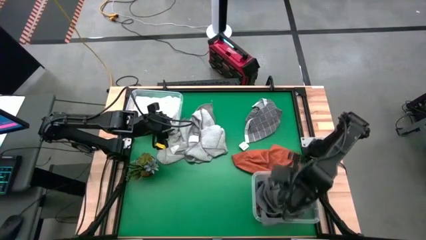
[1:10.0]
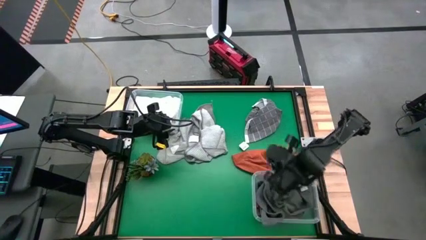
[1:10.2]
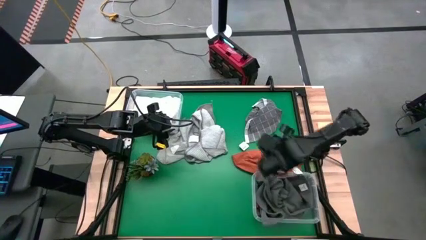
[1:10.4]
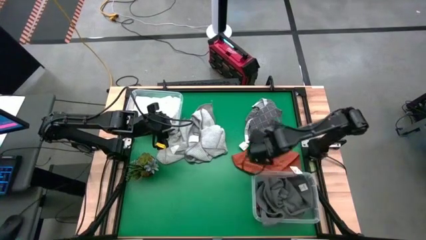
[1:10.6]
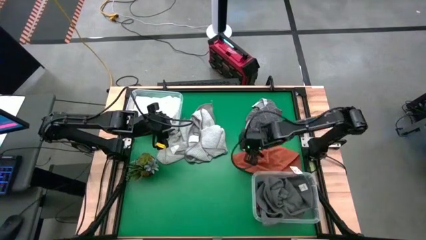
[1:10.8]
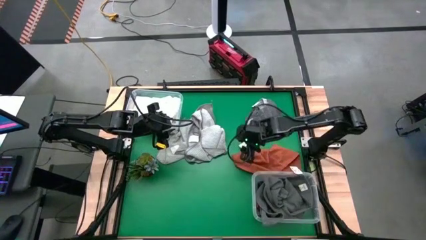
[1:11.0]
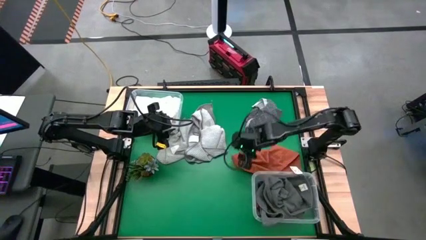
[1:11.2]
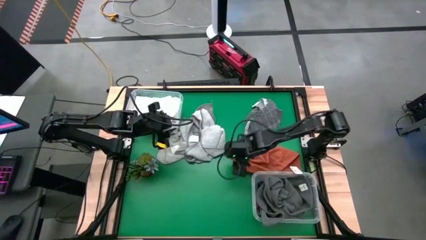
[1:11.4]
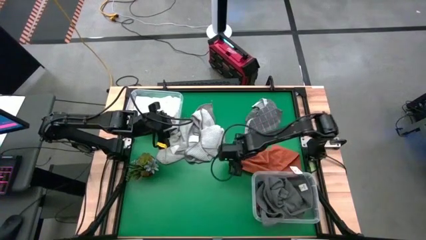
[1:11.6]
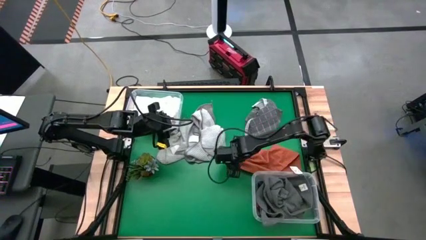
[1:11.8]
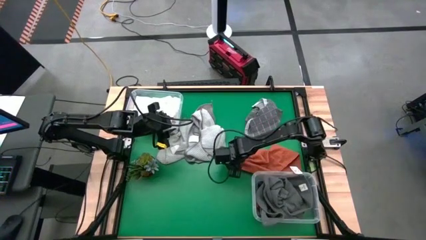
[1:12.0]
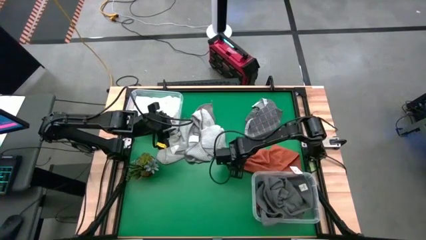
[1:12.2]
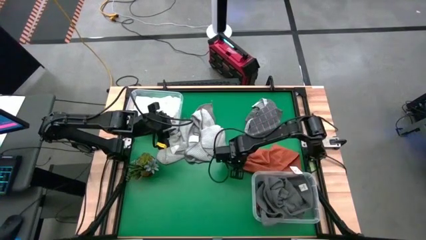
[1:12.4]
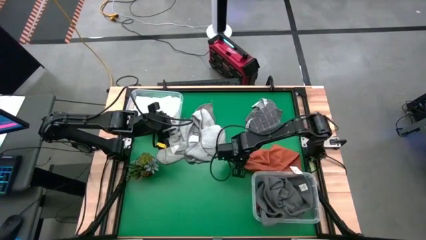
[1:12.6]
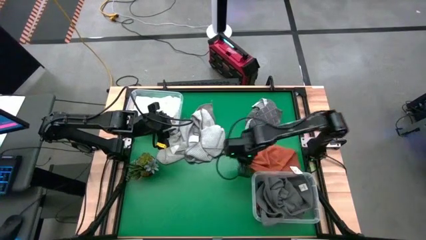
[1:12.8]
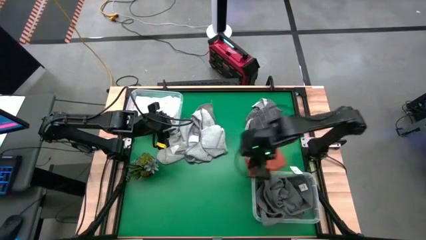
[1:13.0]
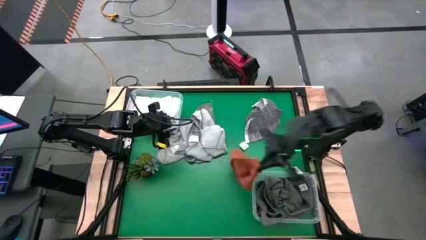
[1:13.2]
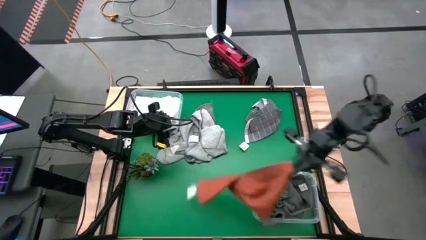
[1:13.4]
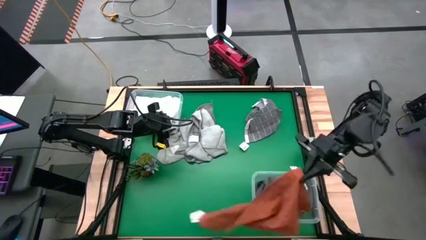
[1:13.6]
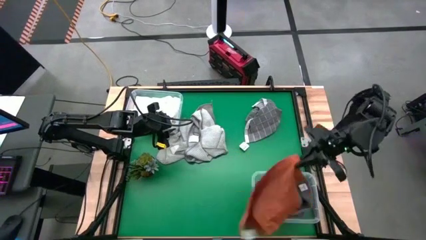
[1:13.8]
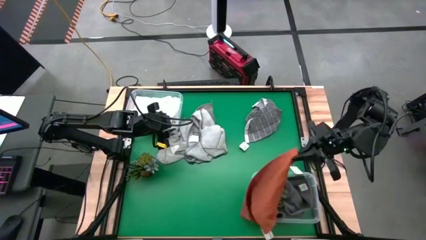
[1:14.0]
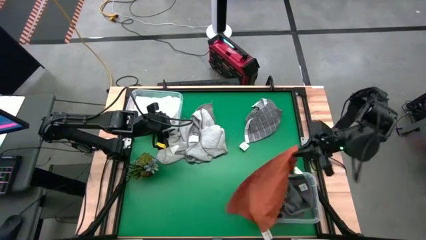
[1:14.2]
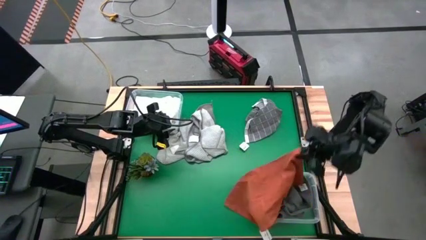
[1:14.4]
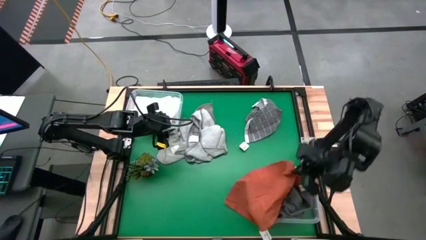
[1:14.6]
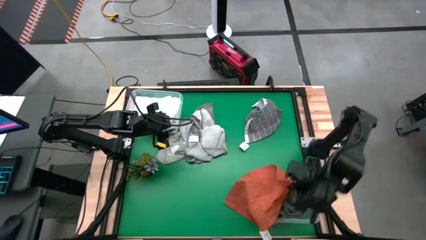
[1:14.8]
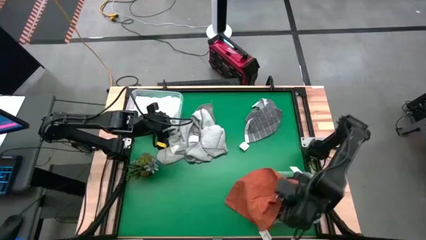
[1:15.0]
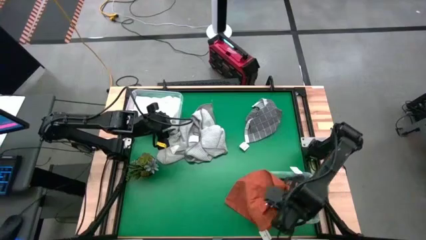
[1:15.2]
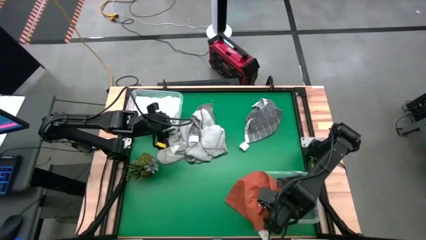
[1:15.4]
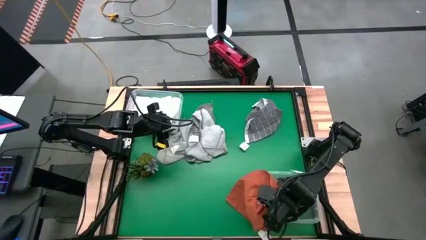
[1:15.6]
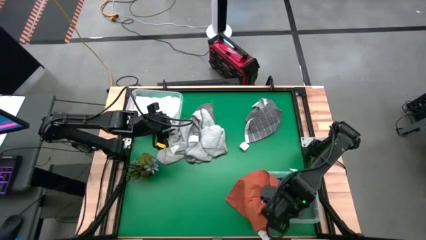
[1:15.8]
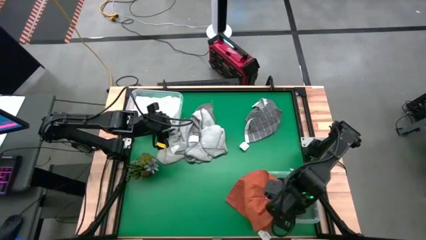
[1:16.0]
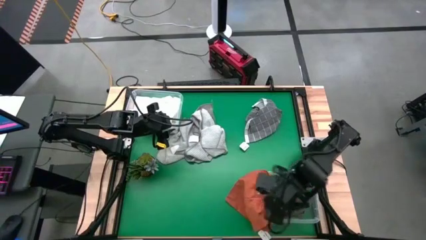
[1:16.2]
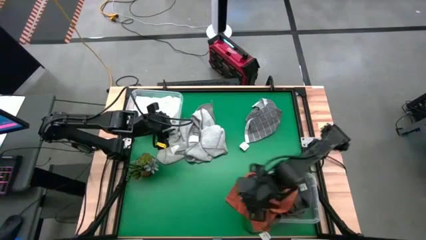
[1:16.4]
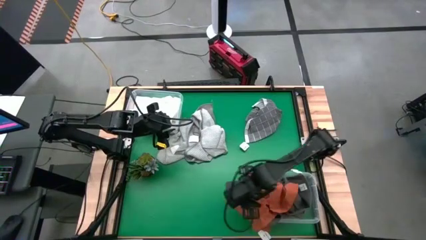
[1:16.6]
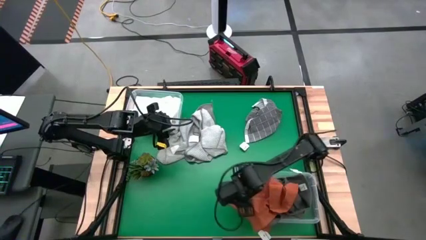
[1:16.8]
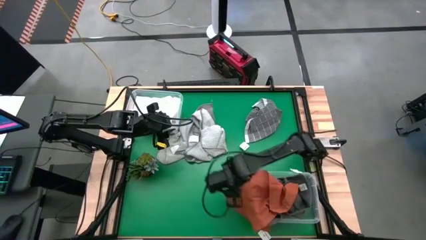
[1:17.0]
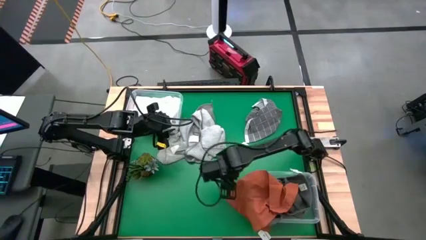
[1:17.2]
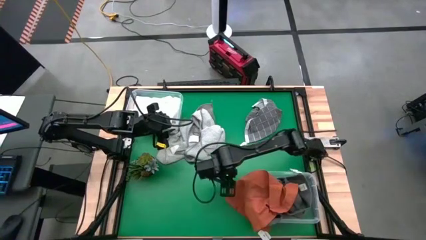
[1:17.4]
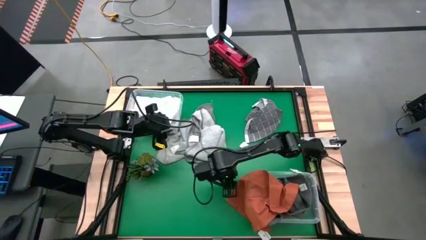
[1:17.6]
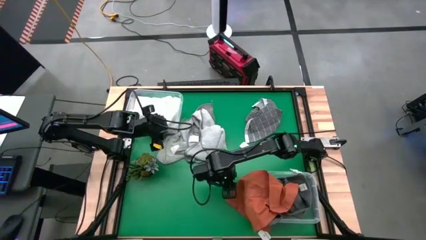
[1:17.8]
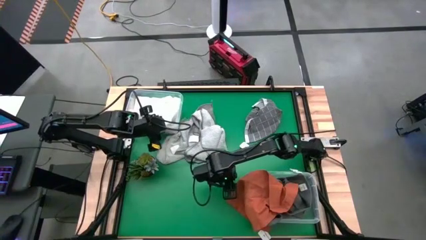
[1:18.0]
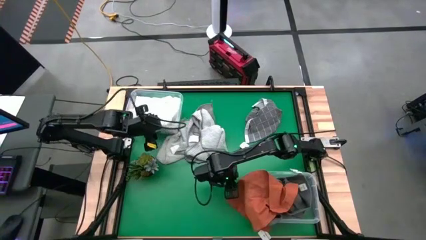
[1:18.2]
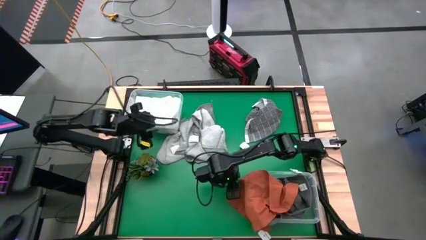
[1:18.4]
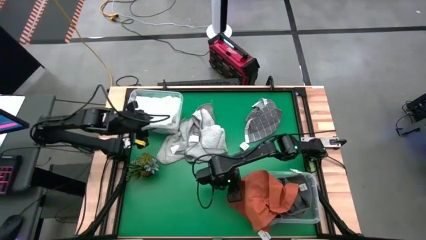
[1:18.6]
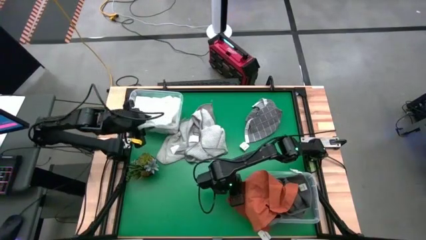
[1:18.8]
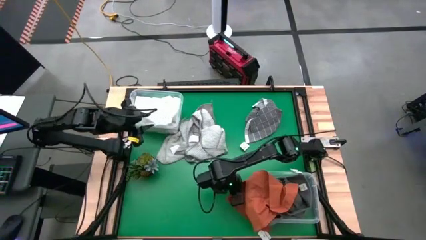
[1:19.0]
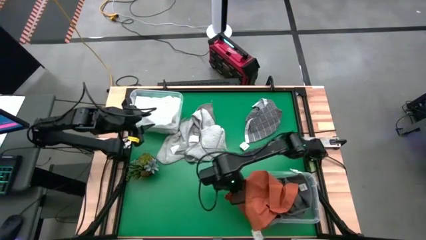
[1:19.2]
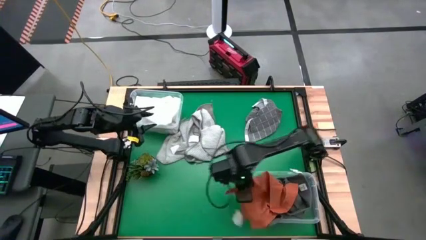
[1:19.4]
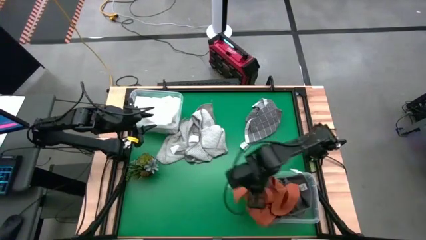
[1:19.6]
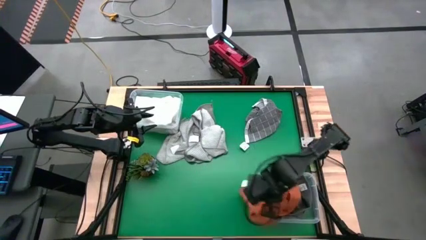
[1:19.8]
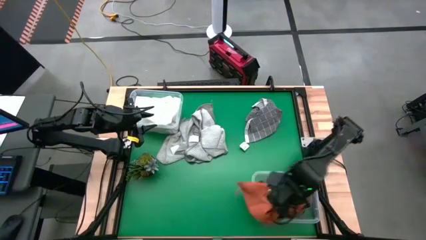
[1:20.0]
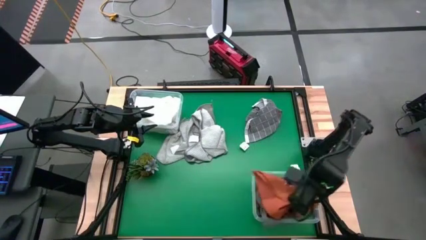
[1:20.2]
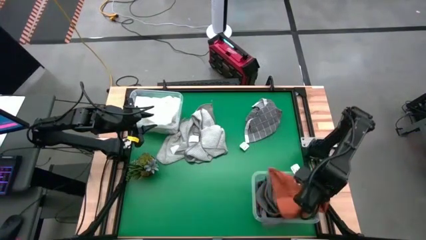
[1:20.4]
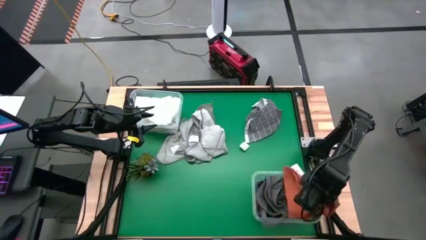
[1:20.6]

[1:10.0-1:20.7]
Task: Sort towels by color in basket
Put the orange towel into the bottom transparent bin
